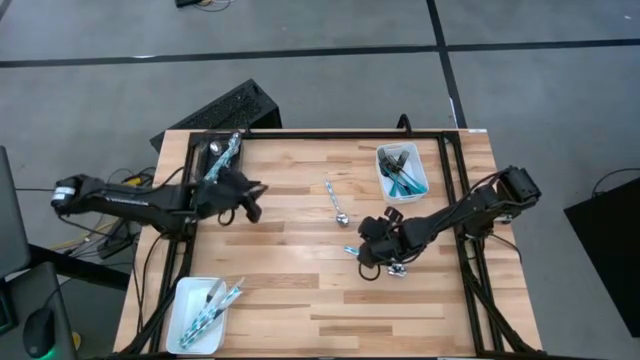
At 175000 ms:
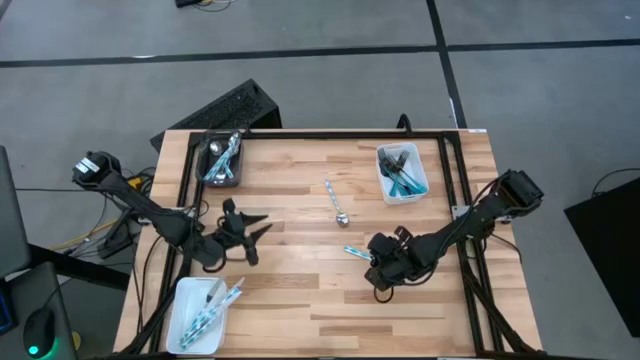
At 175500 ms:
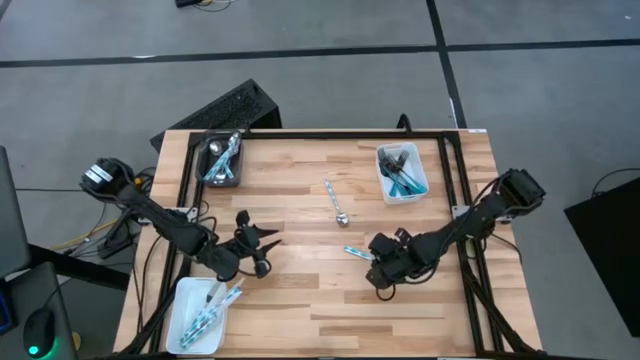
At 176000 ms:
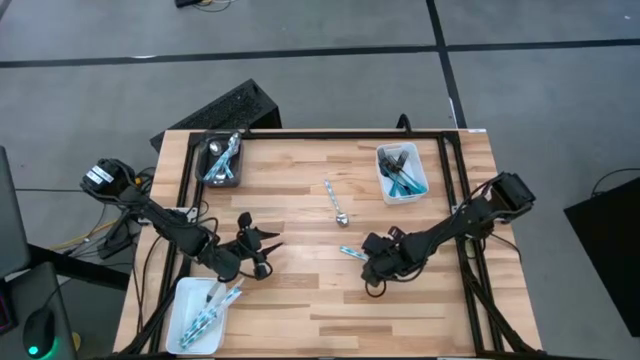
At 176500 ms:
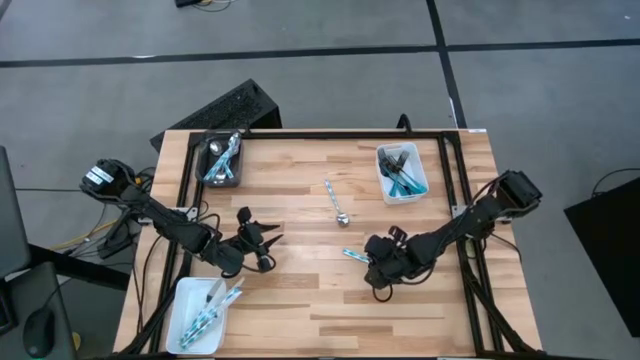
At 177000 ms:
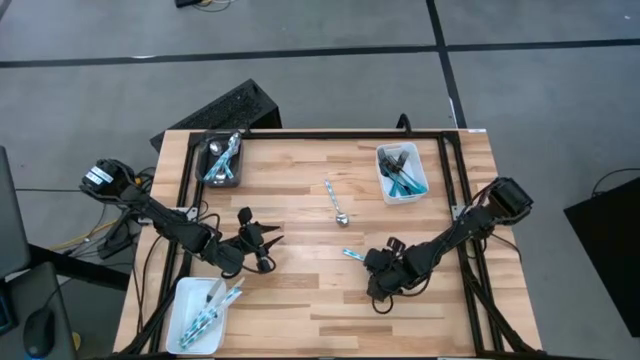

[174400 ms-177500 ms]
Task: Sort silverware by color (type)
Put the light blue spoon into the black bin

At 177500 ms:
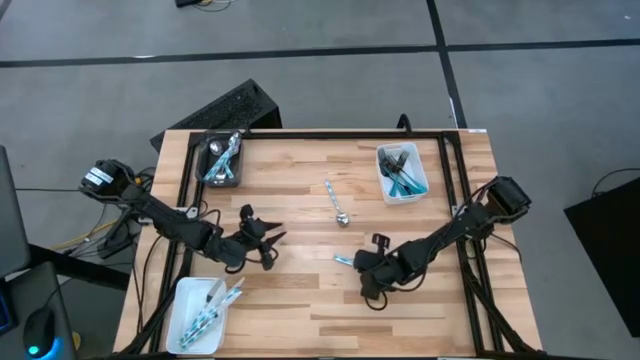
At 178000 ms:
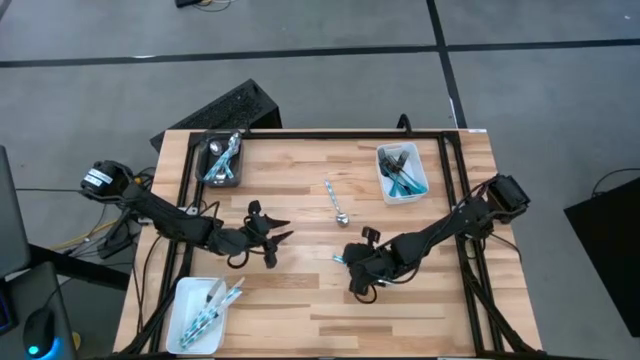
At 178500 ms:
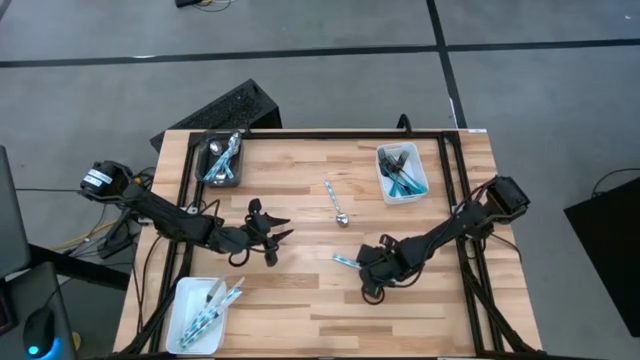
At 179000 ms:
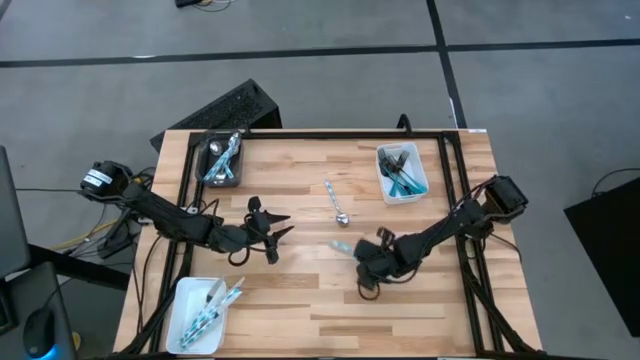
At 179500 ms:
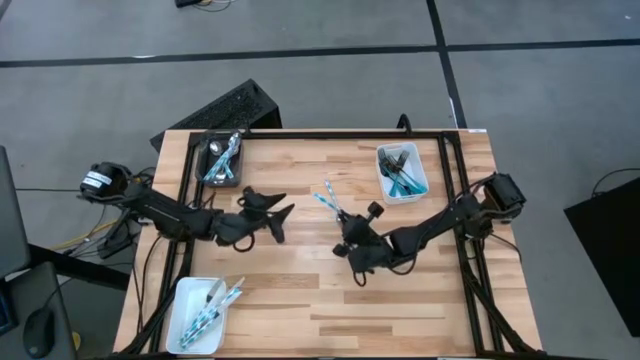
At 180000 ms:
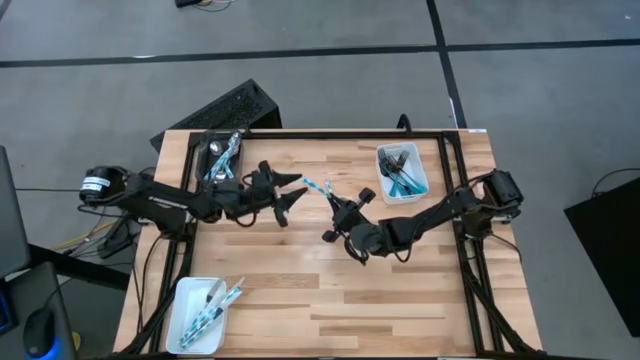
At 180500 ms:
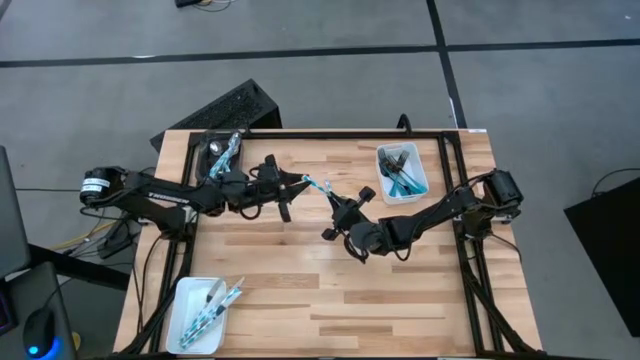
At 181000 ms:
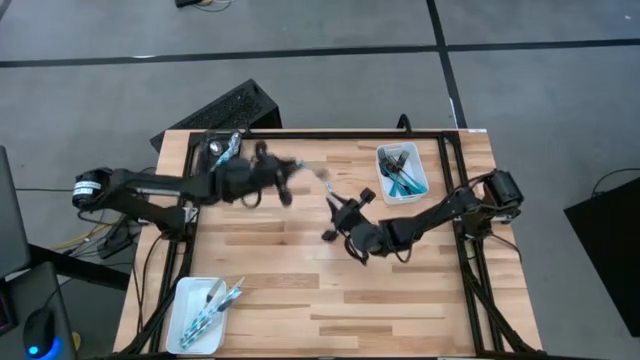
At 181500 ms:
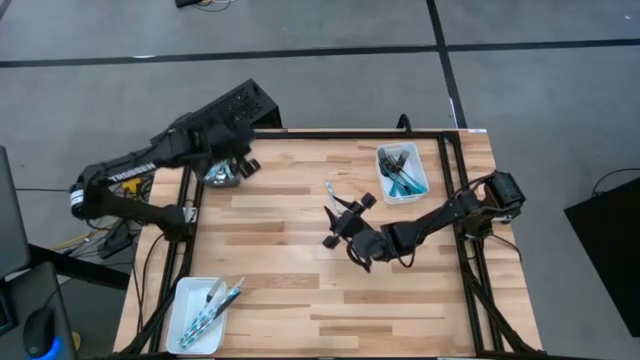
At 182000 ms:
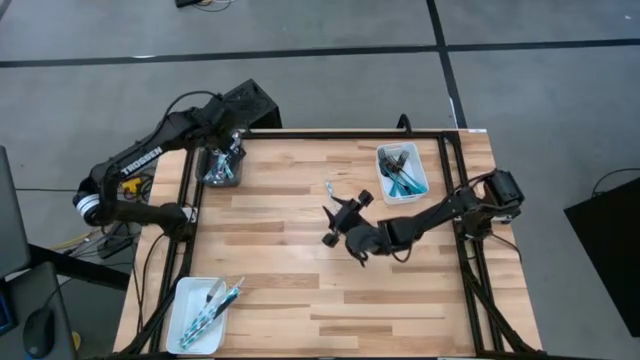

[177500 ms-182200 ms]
Put the light blue spoon into the black bin

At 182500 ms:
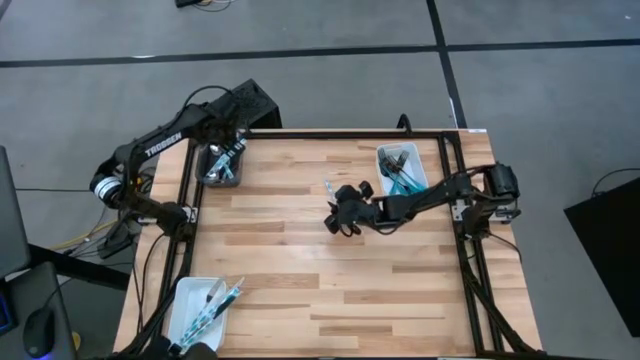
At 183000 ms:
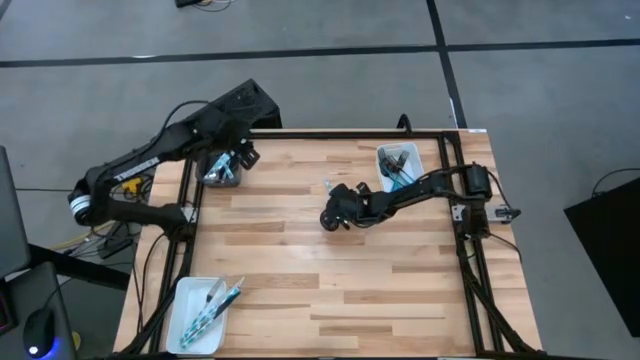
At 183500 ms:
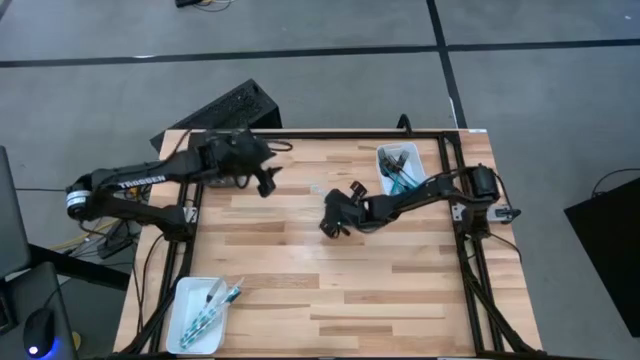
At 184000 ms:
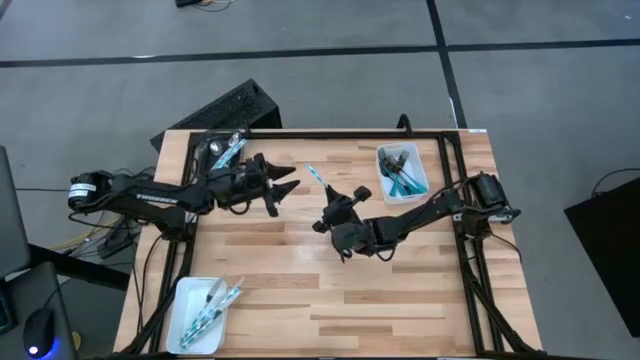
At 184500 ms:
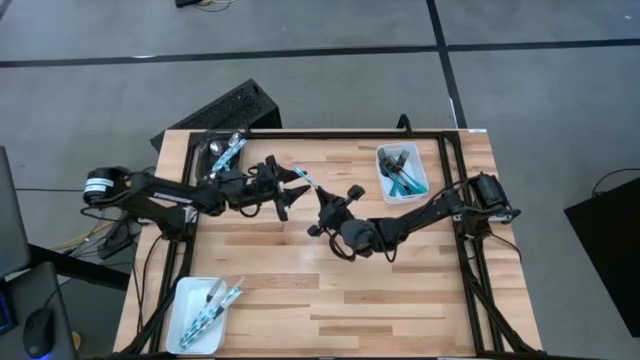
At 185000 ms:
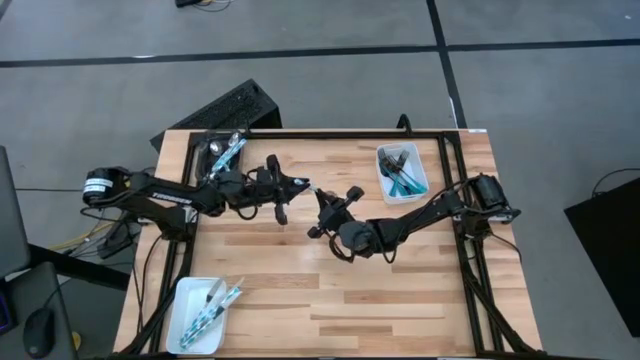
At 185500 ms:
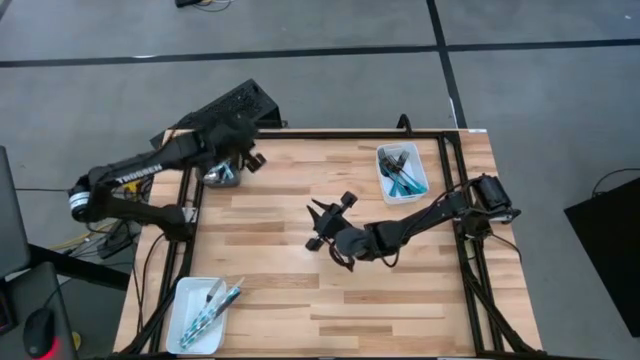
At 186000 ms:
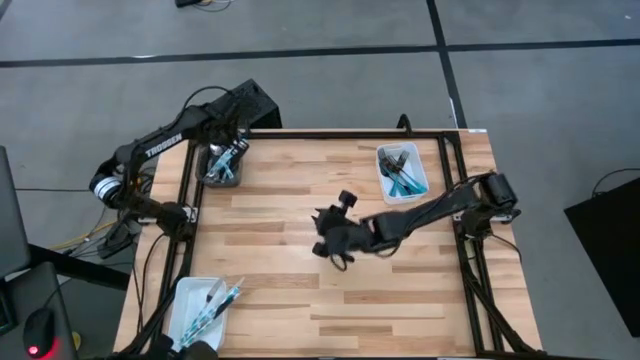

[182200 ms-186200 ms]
Put the light spoon into the black bin

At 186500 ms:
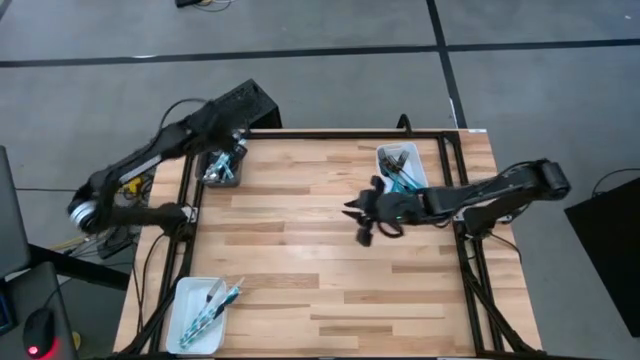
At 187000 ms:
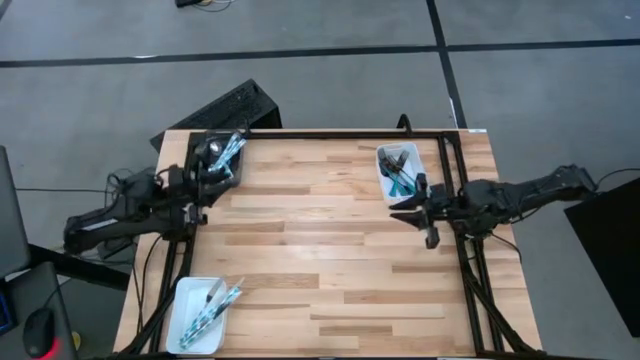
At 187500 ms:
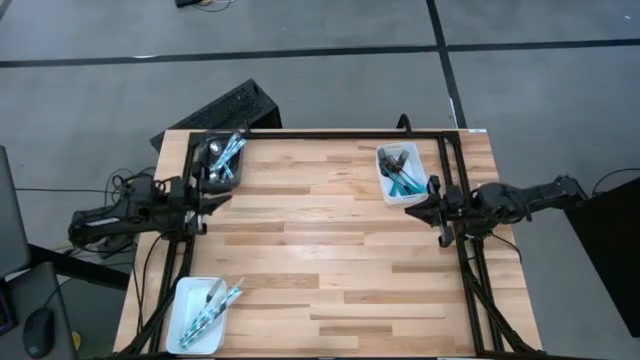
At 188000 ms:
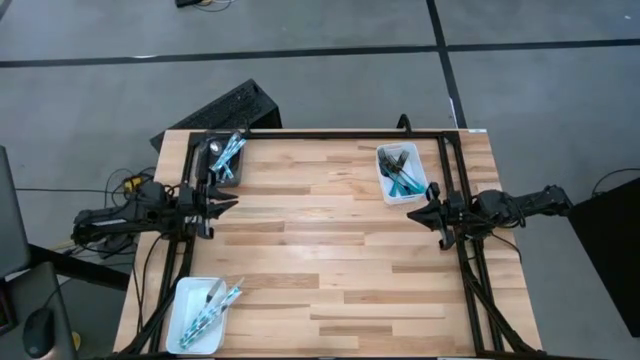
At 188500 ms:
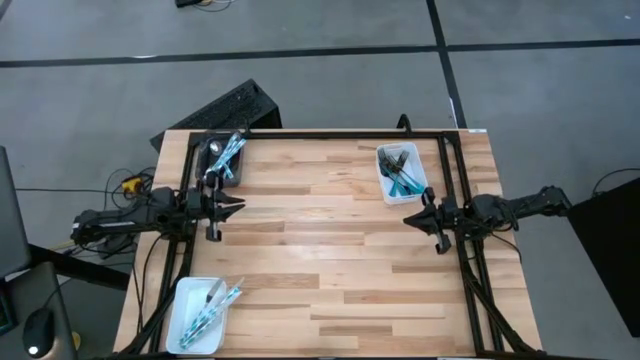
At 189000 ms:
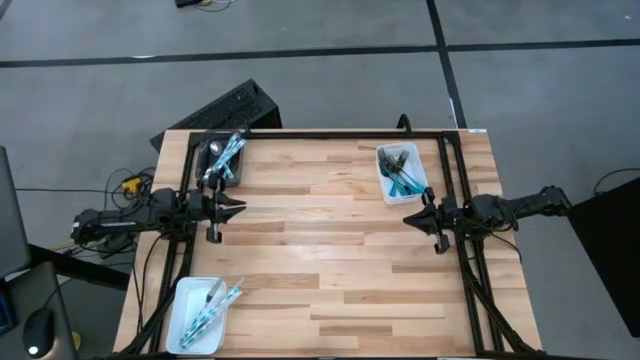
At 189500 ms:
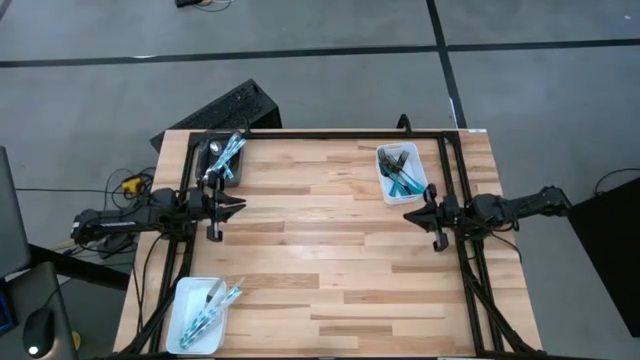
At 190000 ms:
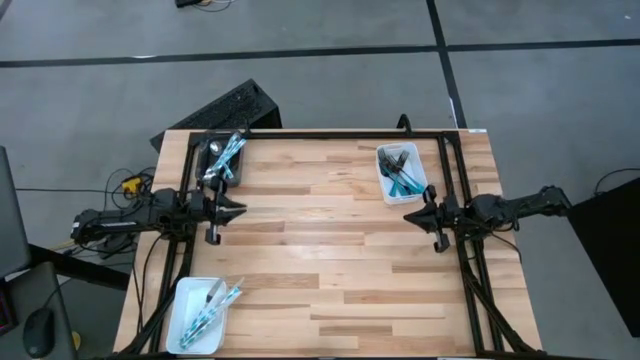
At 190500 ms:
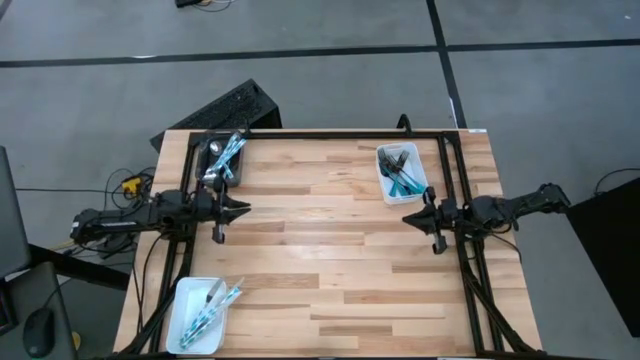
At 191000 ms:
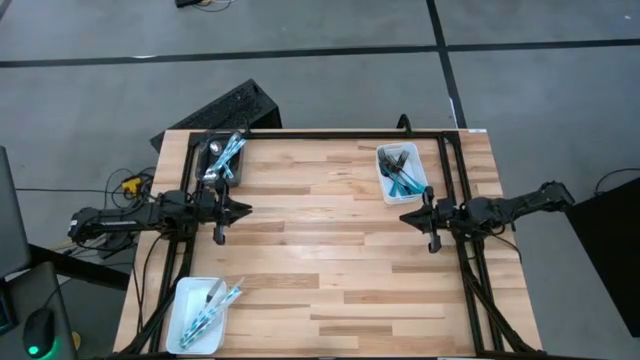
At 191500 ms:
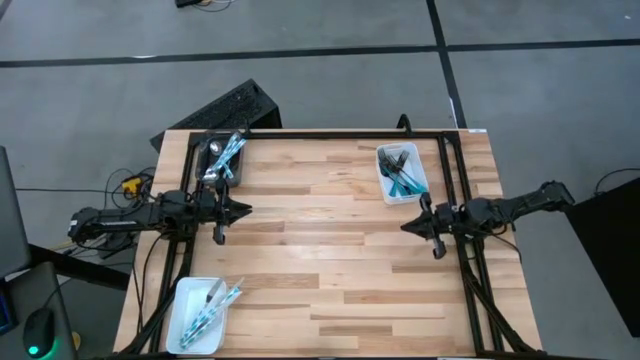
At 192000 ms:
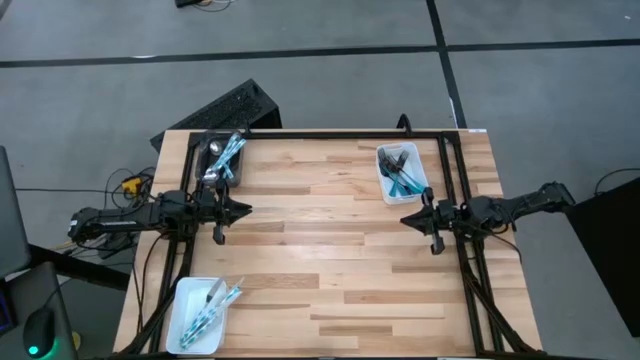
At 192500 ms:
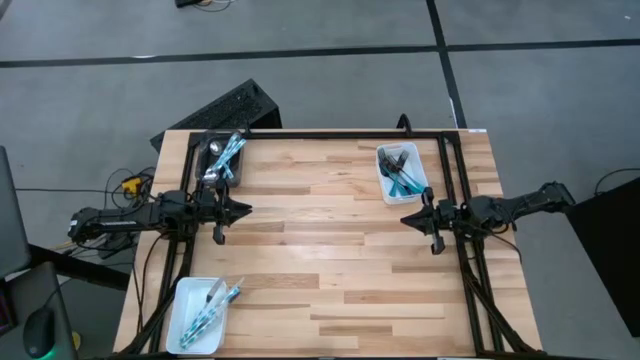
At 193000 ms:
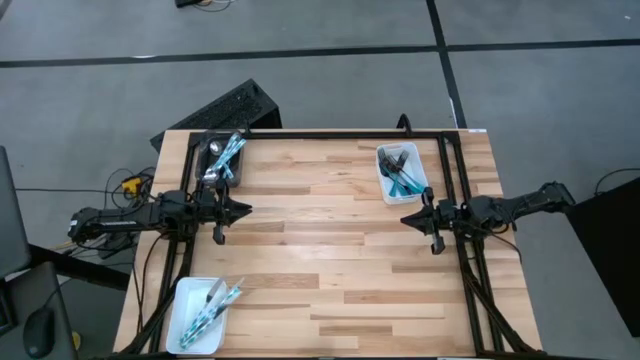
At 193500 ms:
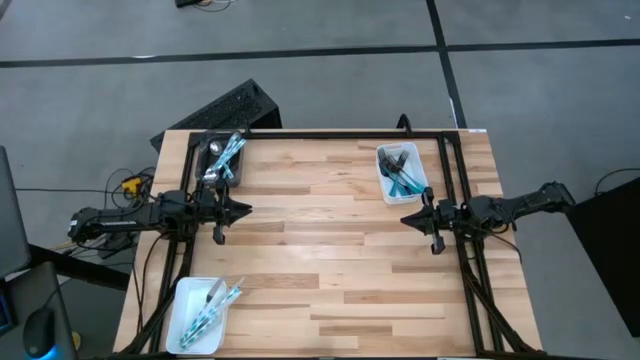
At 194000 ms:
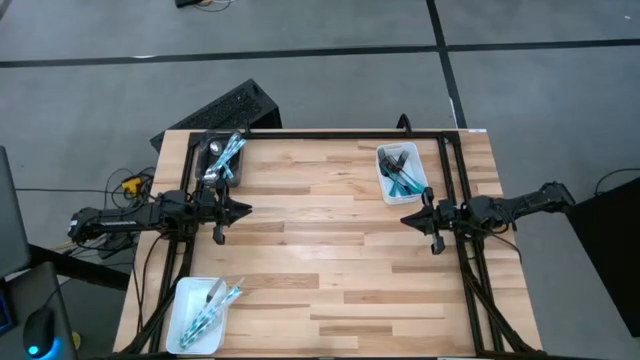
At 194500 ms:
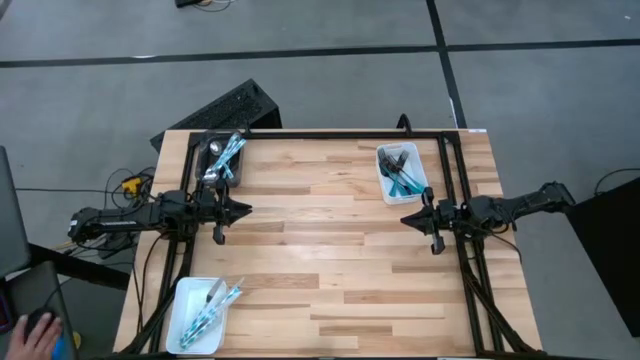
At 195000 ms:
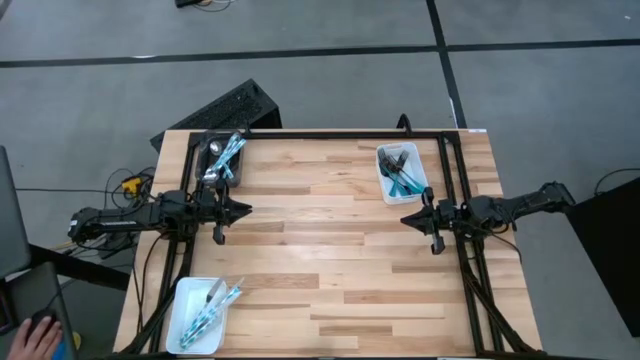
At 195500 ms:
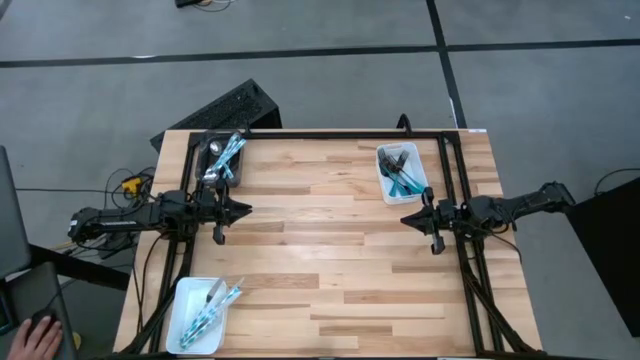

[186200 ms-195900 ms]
Return to Home Position
